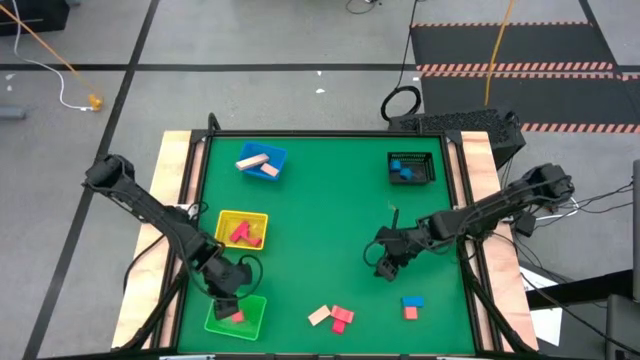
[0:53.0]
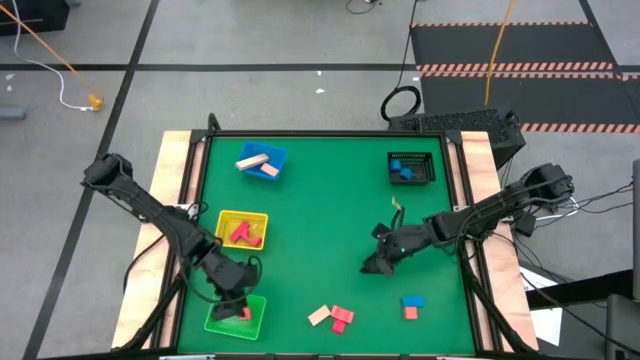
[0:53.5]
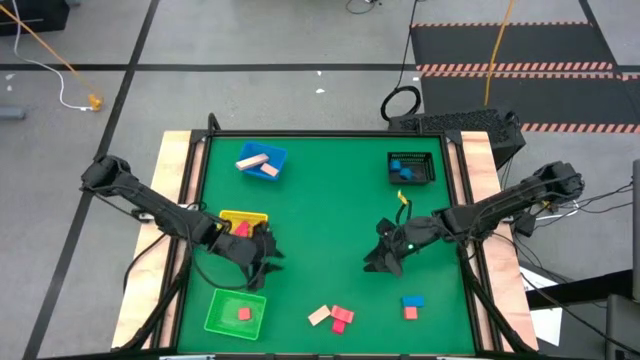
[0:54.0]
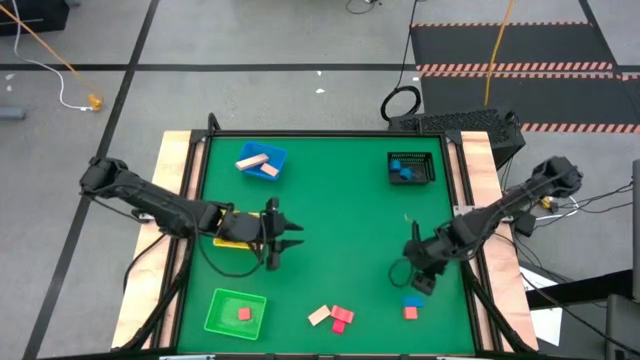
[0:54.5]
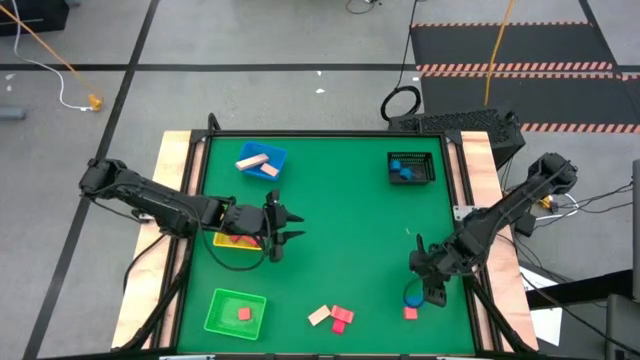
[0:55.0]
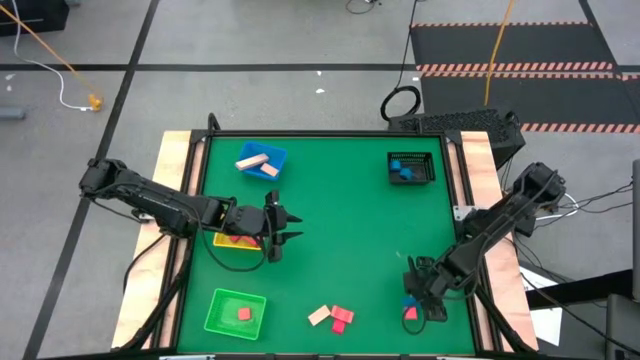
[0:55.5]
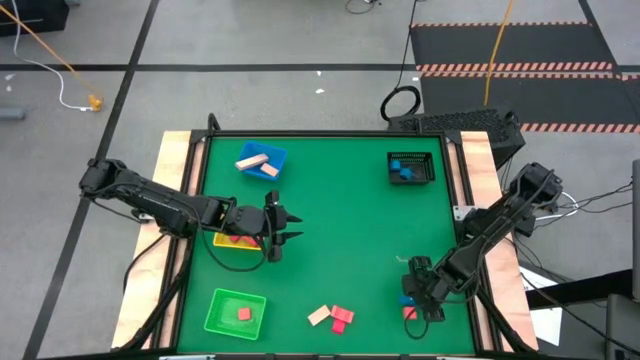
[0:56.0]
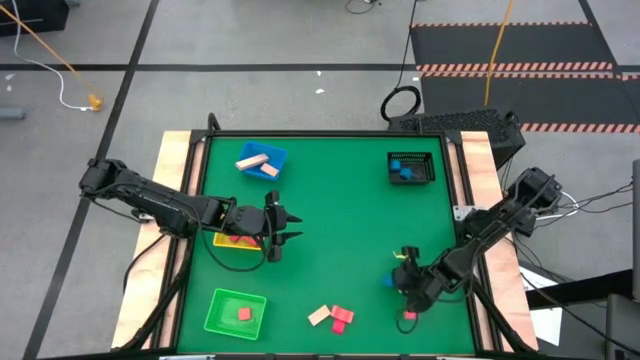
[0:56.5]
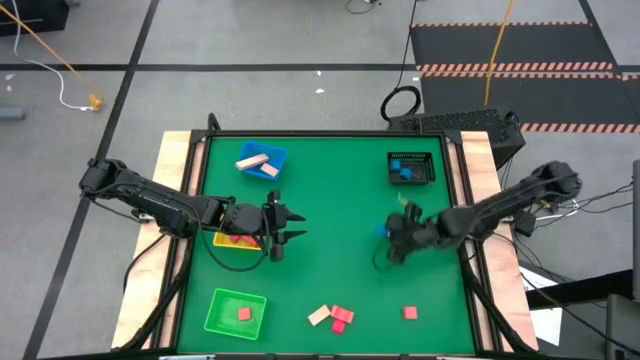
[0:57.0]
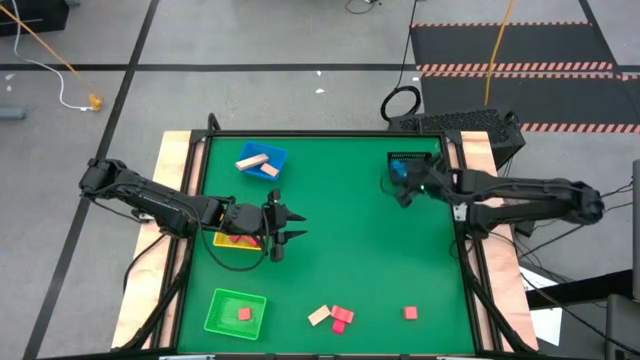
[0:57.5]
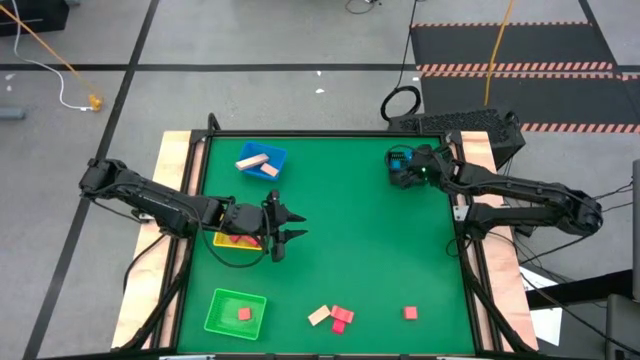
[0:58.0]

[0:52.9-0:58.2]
Task: Sort & place blocks by color
Put the blue block into the black bin

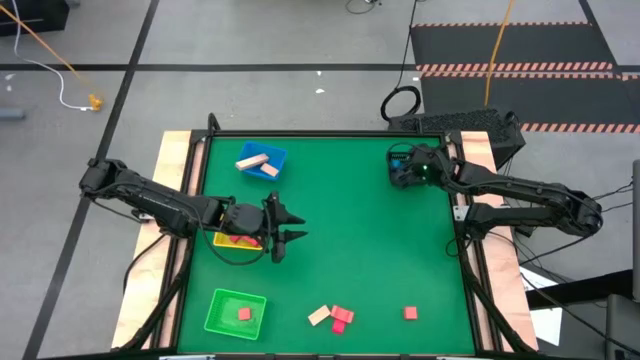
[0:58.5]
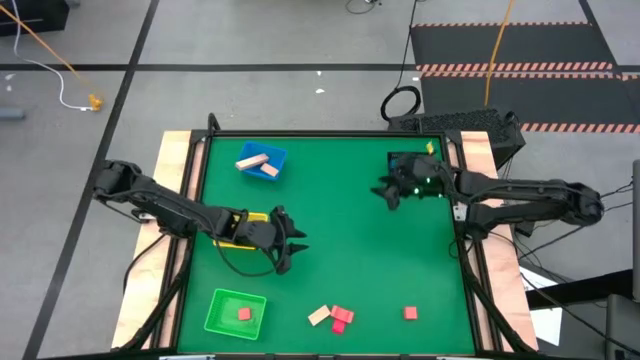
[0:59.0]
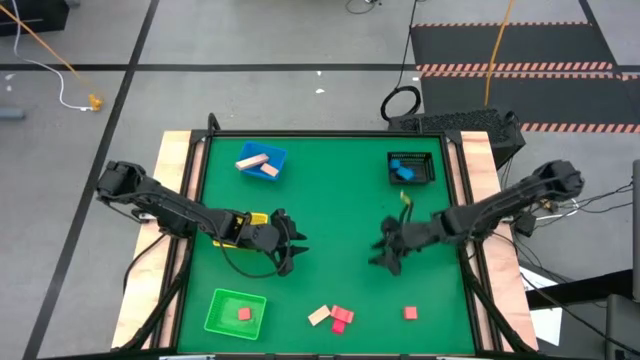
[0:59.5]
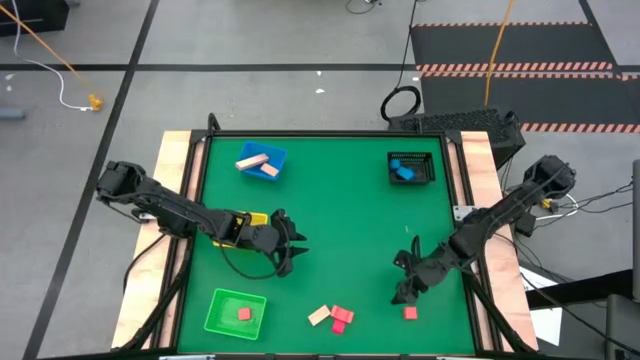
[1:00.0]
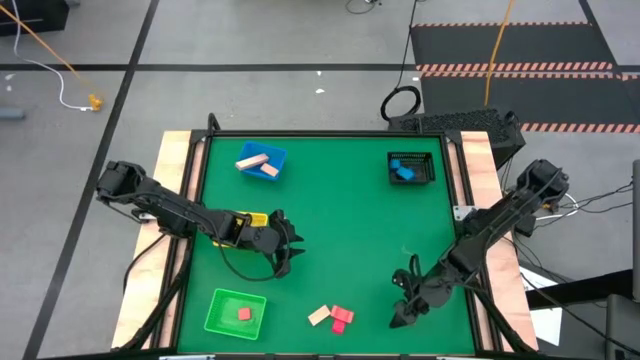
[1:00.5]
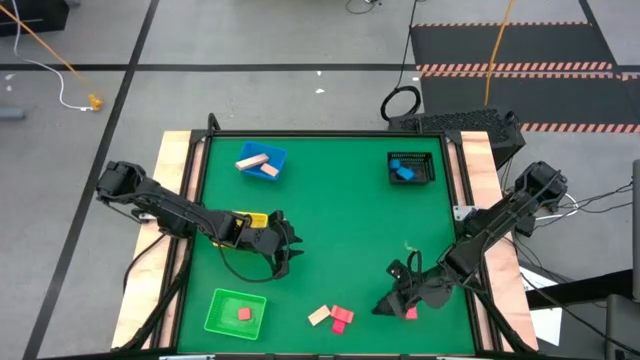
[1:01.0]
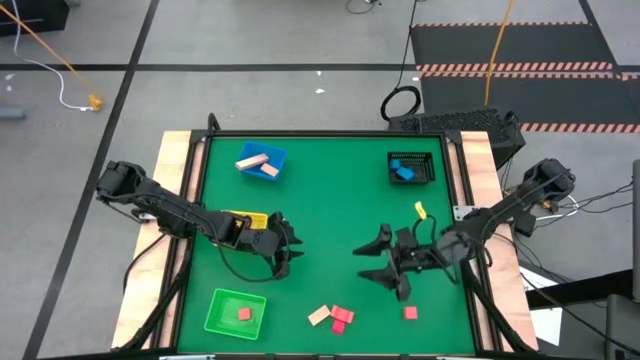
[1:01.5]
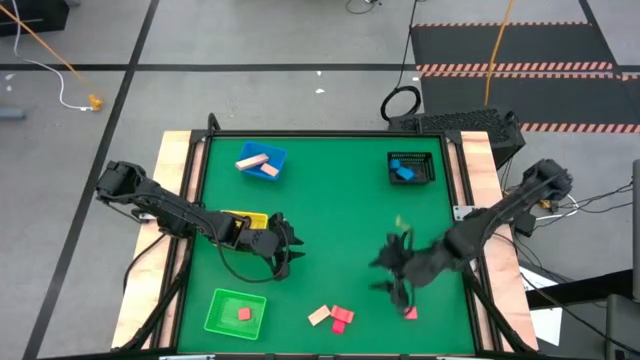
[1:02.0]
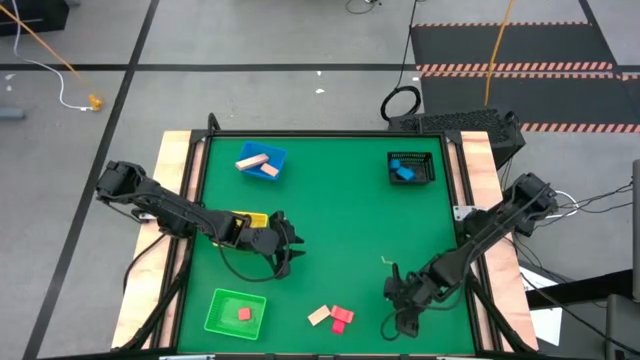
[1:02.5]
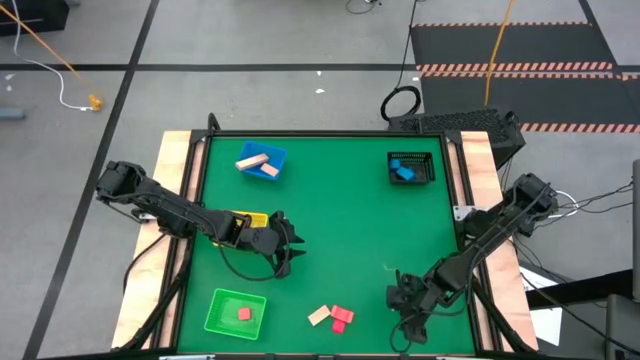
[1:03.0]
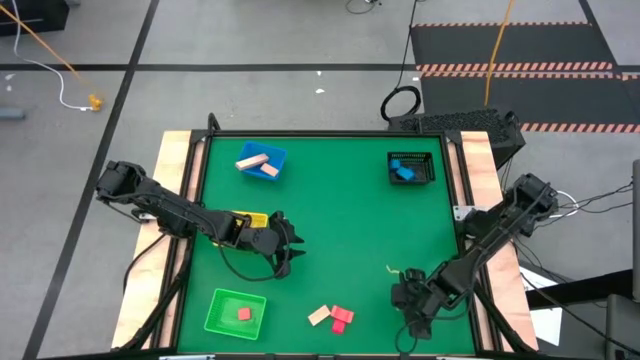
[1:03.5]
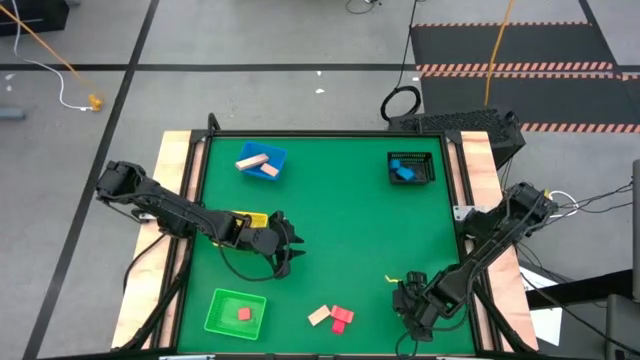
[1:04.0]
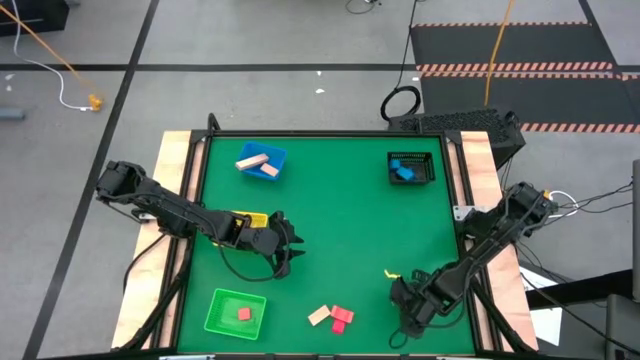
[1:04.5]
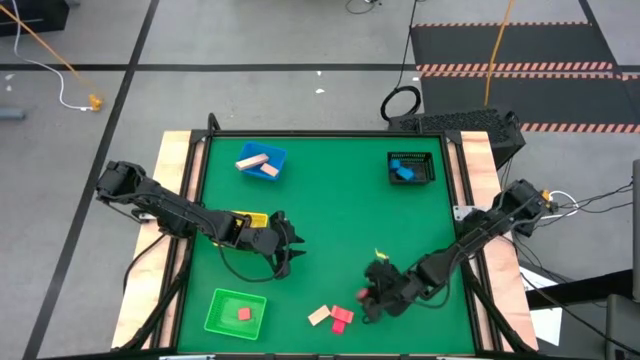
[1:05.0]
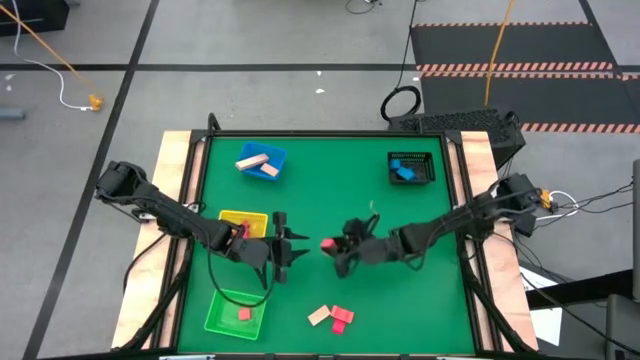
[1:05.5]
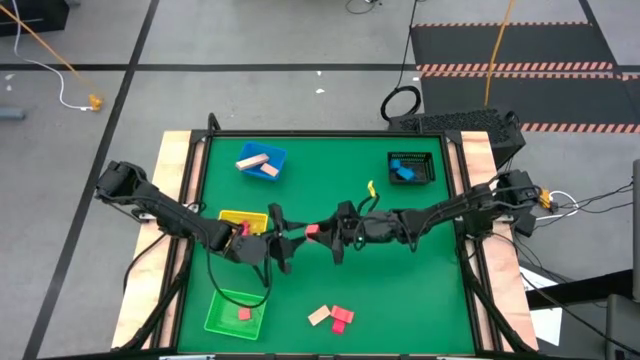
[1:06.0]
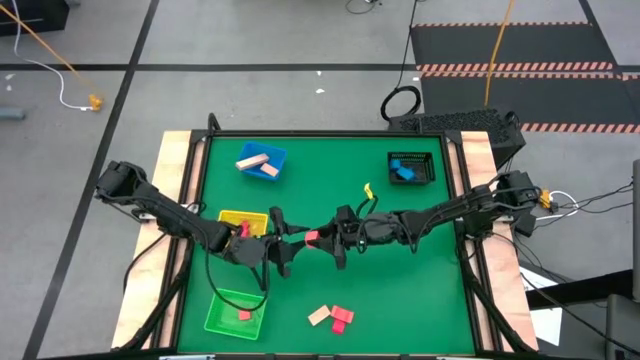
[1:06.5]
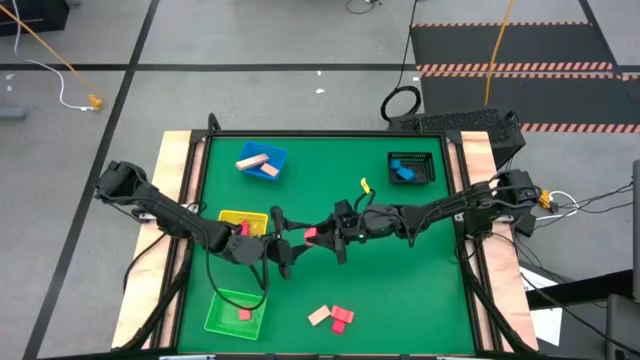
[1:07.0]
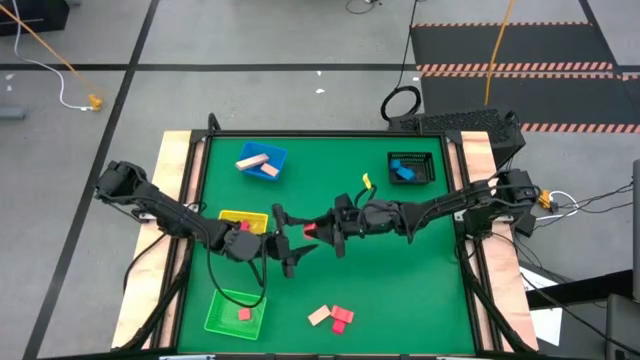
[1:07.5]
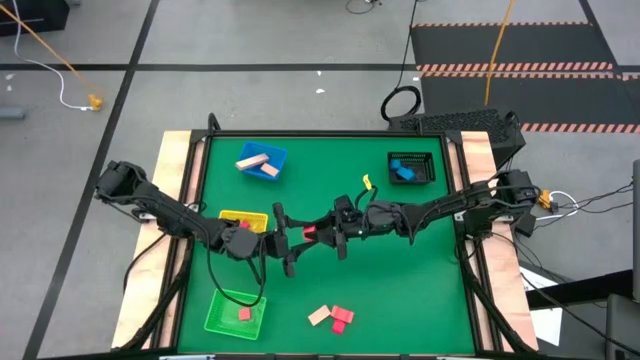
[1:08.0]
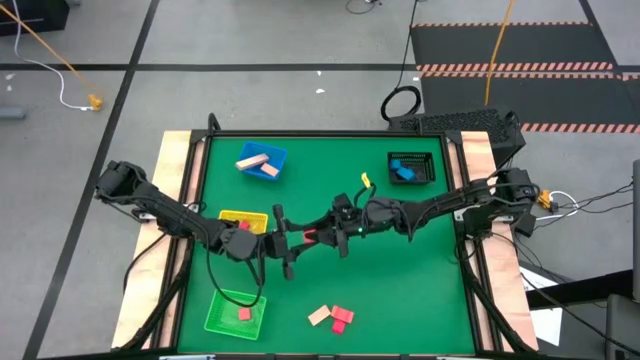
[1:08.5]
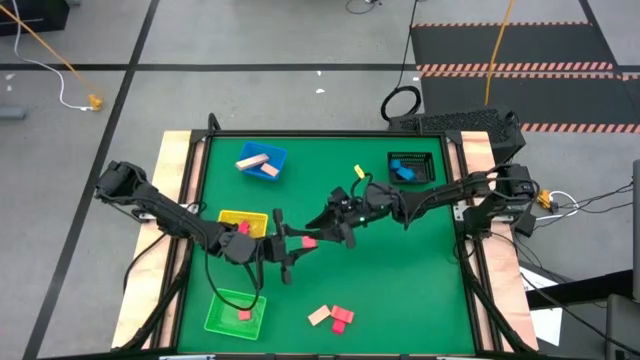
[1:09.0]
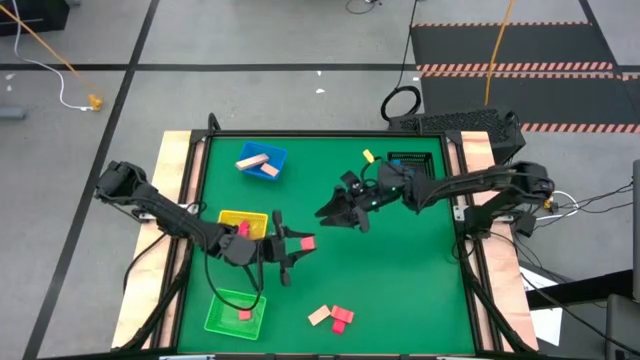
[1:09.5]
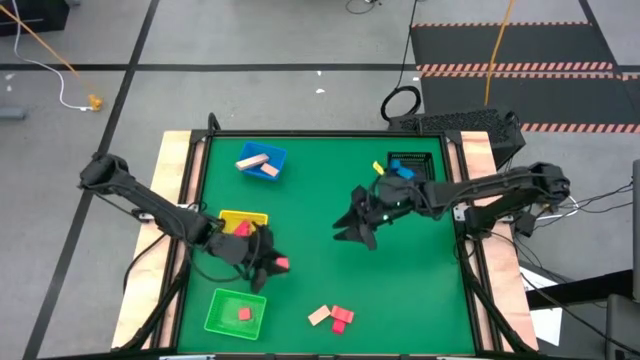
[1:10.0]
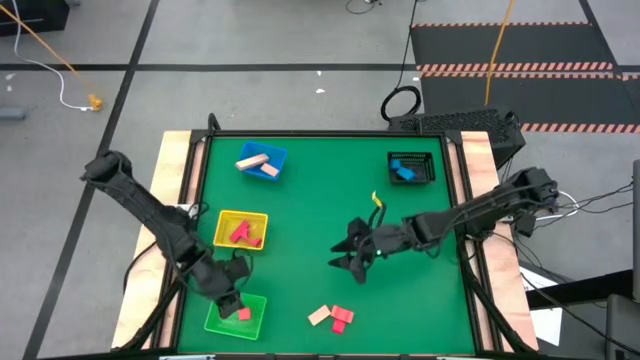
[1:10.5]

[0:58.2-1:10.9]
Put the right orange block into the green bin

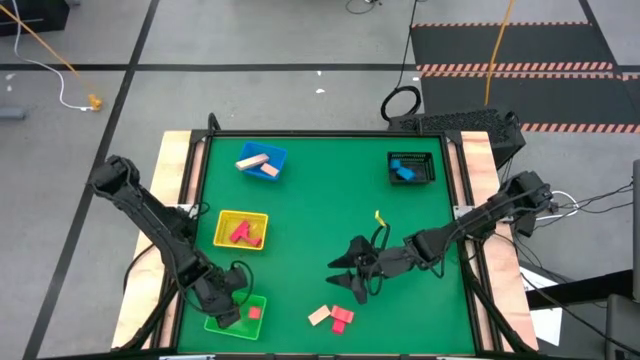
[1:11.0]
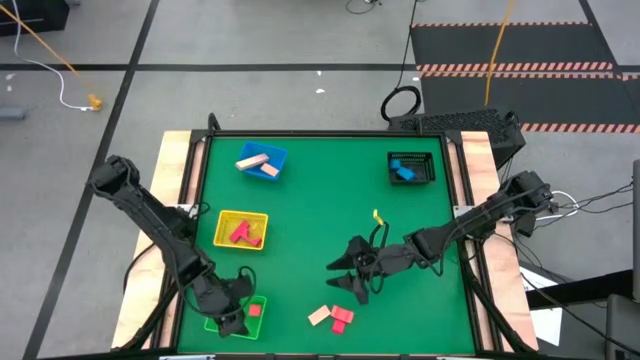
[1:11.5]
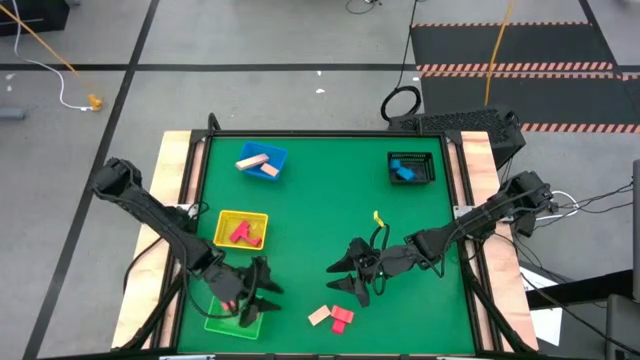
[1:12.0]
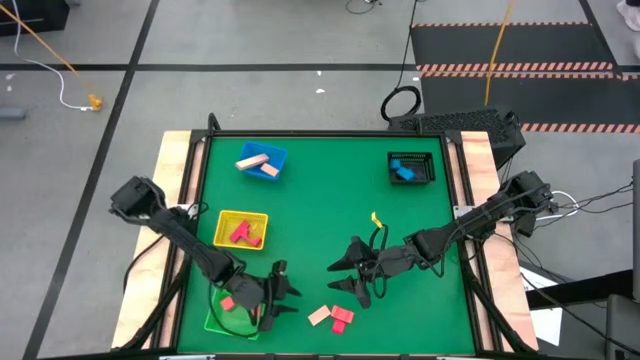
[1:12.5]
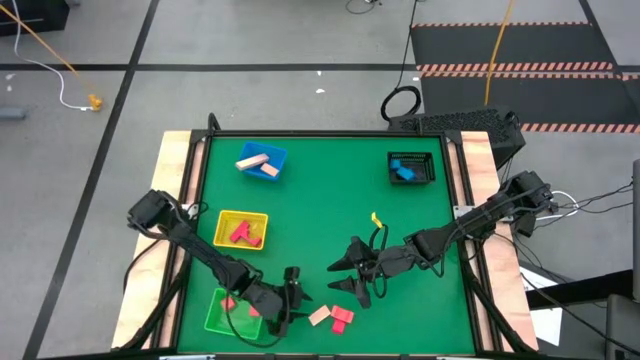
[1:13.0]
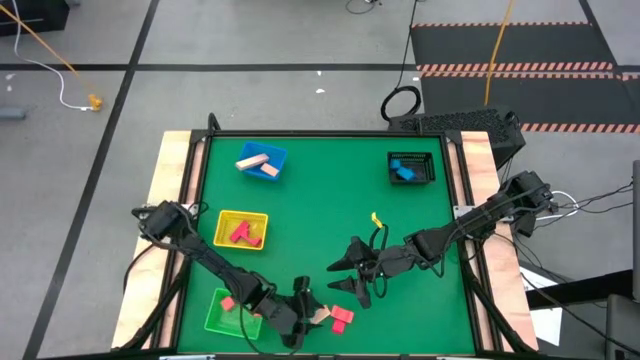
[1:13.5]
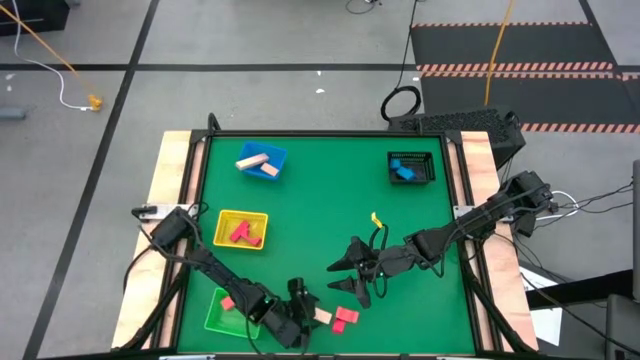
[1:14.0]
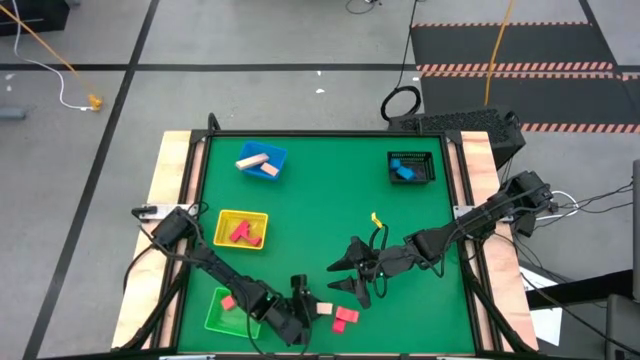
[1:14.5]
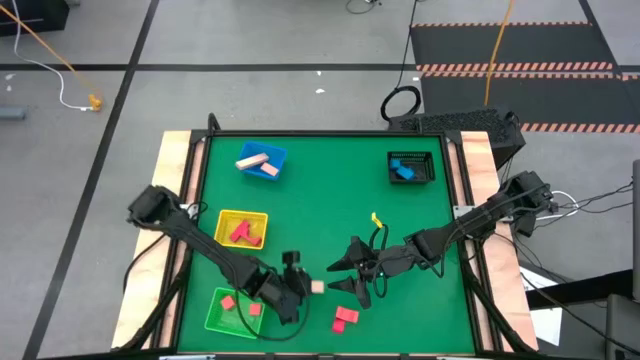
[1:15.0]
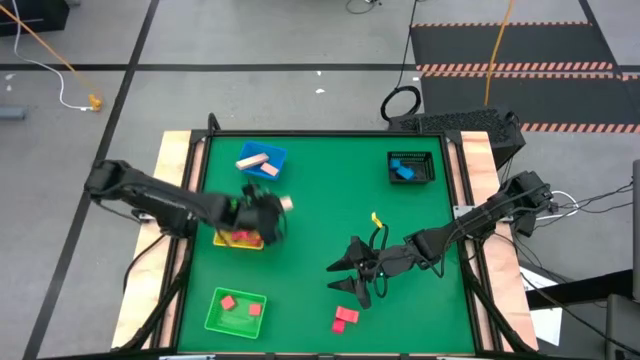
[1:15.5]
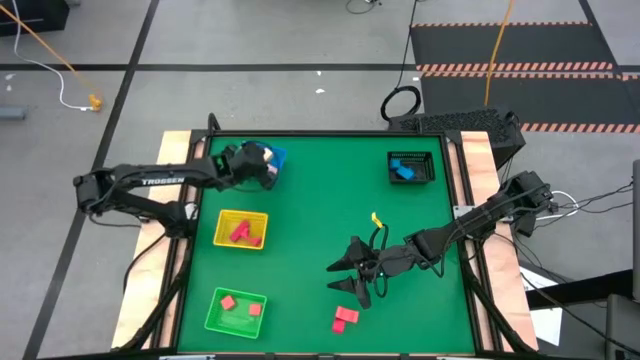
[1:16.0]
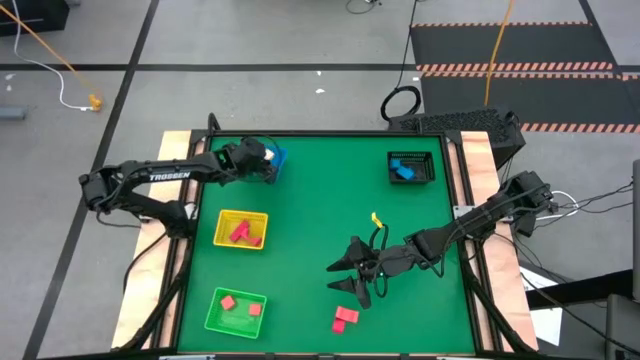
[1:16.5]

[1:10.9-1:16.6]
Put the brown block into the blue bin
